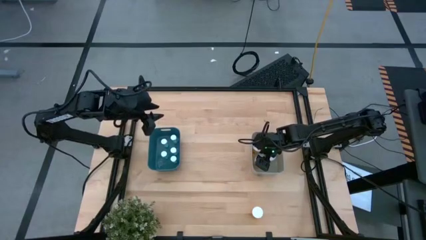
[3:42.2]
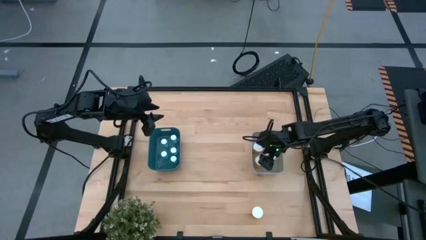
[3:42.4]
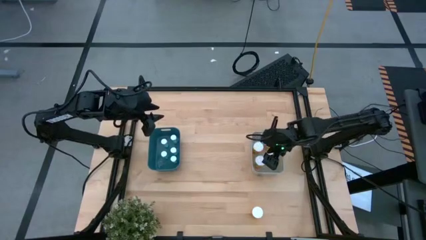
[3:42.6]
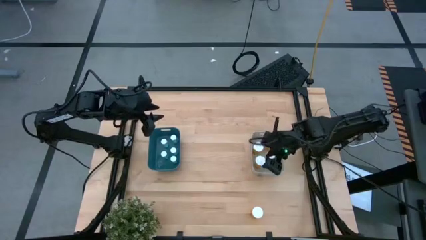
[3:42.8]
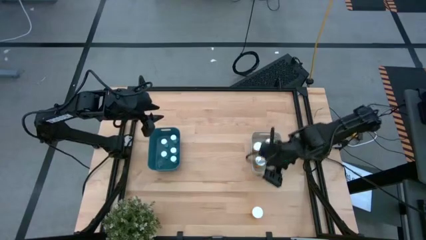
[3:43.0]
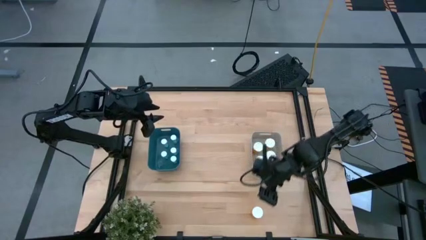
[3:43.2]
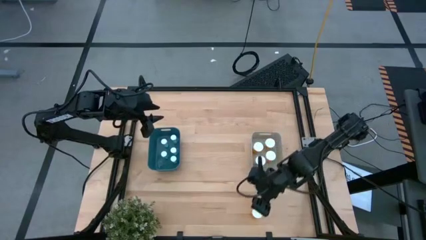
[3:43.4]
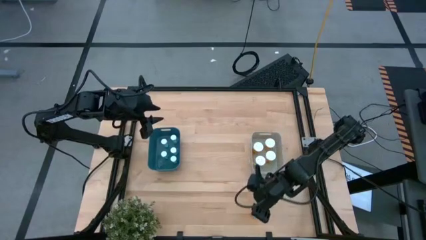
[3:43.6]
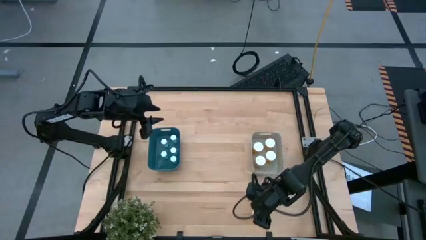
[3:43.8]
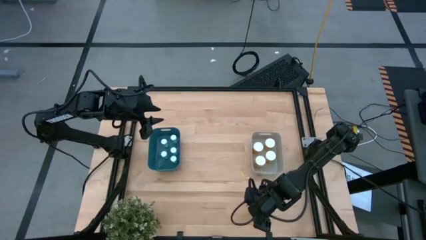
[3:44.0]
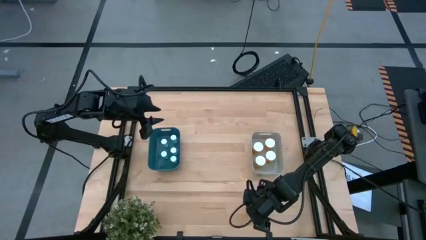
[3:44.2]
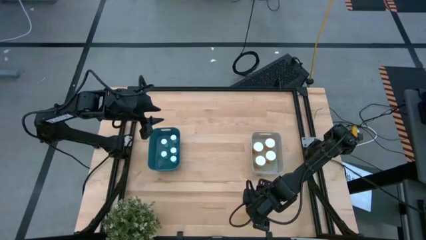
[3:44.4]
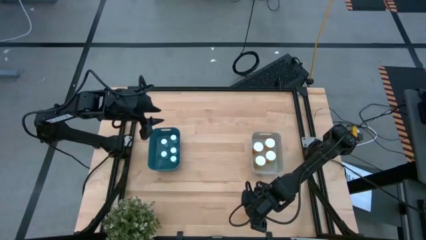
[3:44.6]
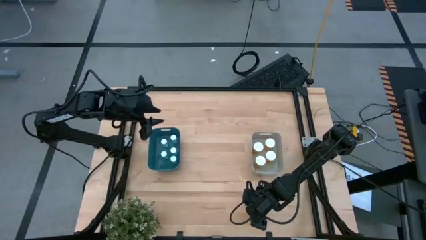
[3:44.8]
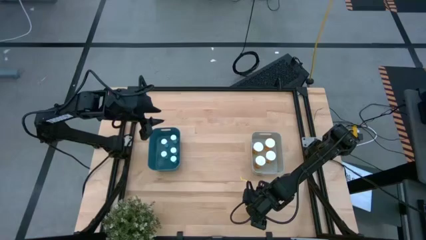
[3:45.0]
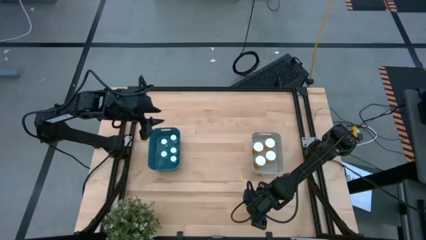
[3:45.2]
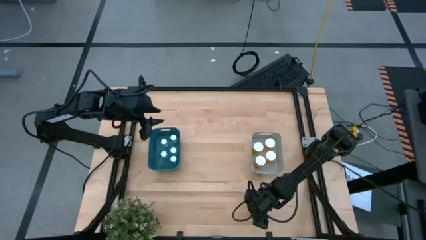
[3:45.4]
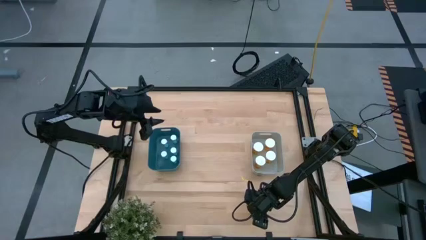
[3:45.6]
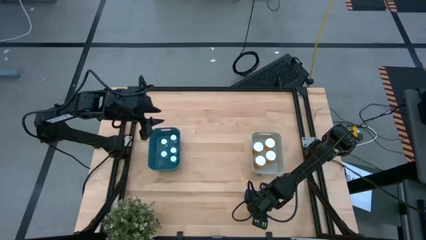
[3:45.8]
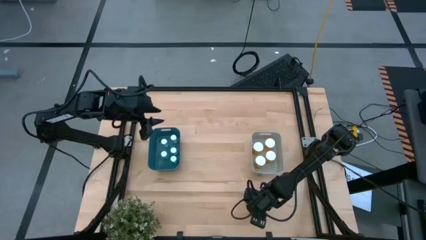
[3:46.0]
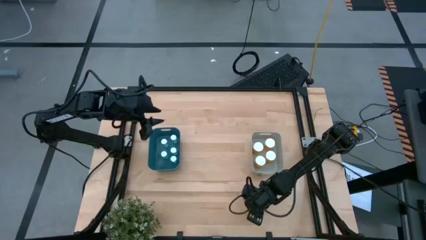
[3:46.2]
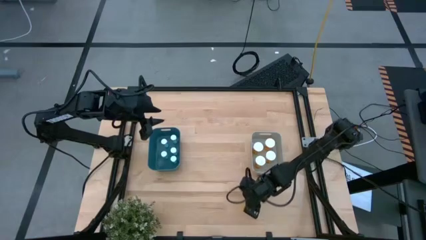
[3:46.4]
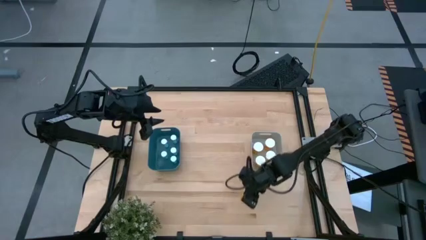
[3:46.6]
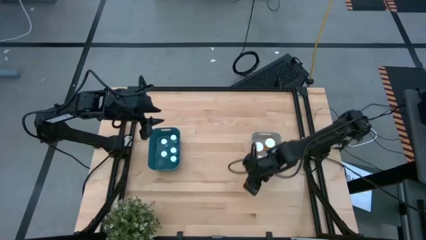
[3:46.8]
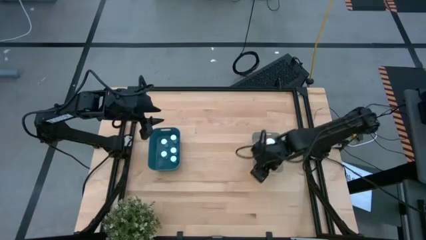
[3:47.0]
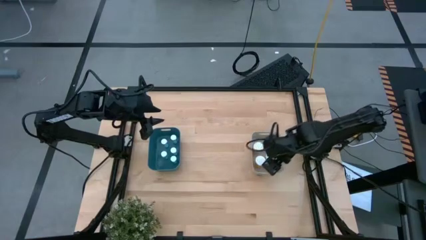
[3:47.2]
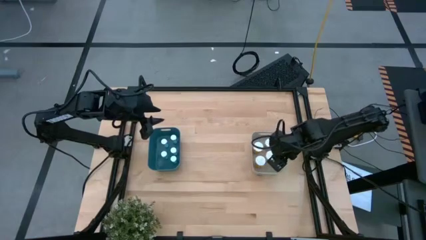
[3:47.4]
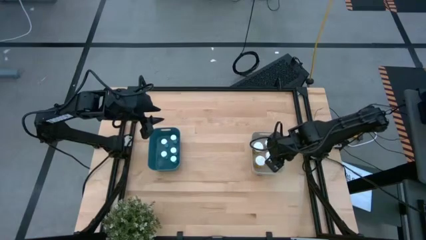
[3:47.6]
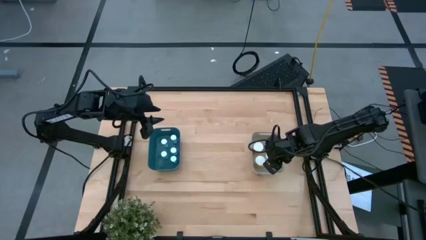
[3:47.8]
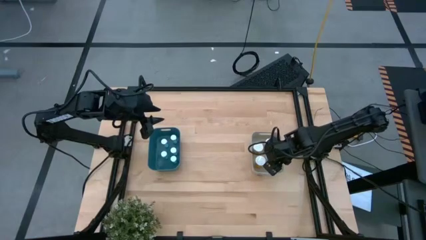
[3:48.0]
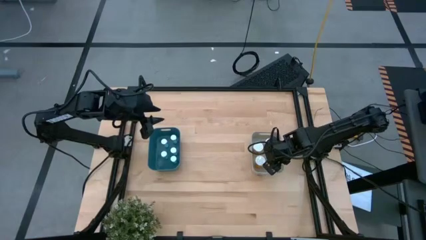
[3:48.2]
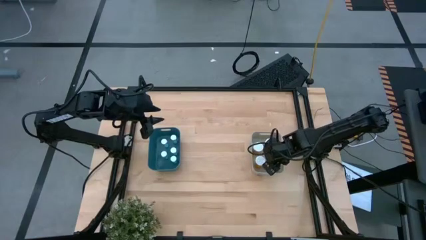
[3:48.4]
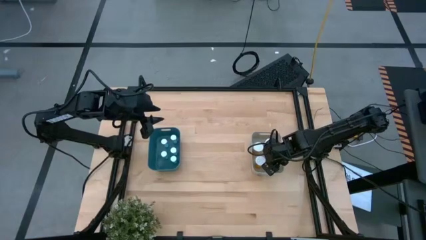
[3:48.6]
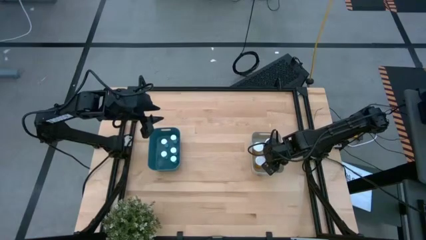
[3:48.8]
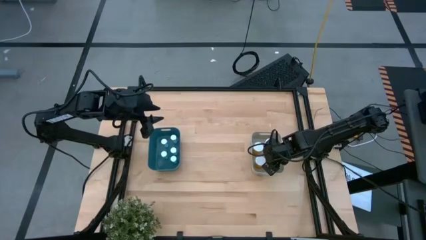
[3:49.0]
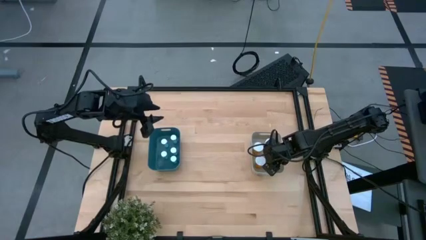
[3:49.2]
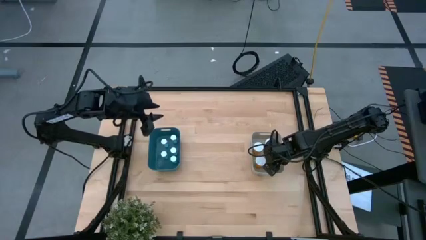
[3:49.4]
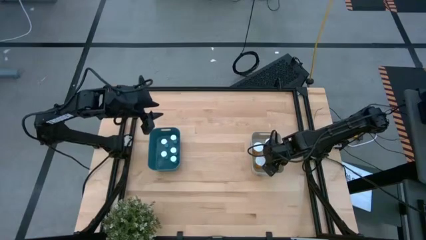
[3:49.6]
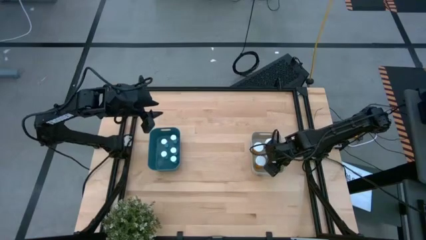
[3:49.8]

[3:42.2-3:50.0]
Task: Pick and place medicine bottles into bin by pill shape (circle, oval)
Put the orange pill bottle into the gray bin

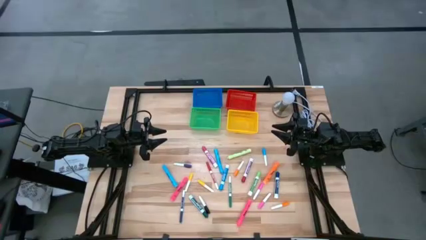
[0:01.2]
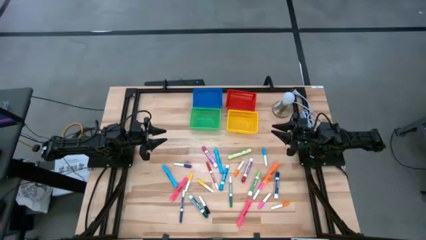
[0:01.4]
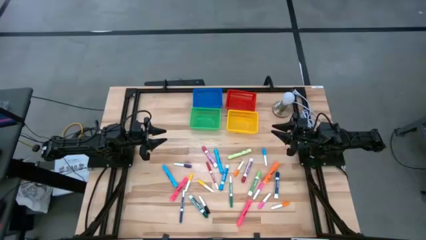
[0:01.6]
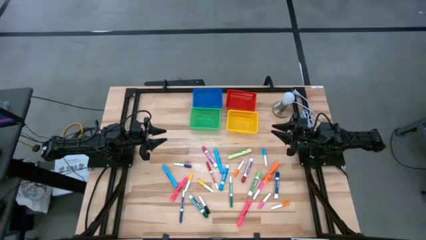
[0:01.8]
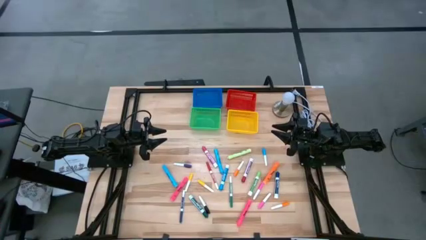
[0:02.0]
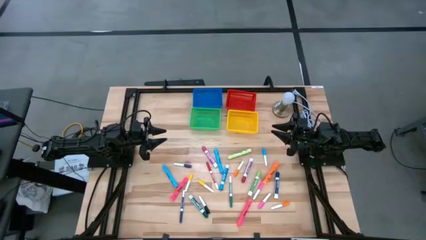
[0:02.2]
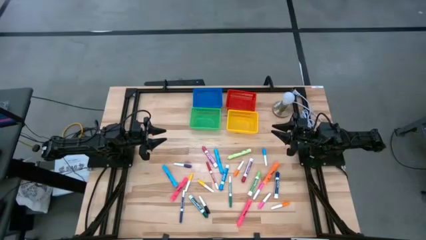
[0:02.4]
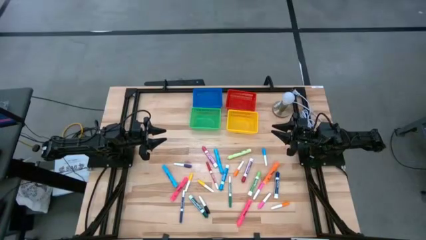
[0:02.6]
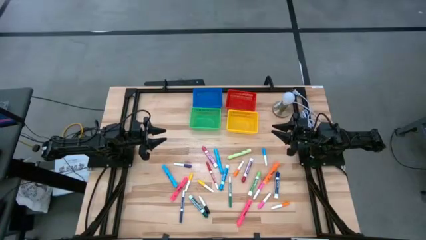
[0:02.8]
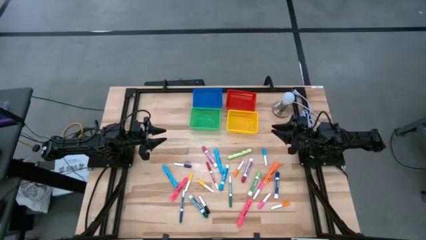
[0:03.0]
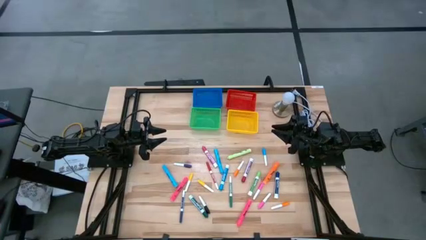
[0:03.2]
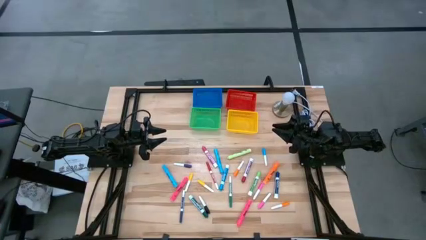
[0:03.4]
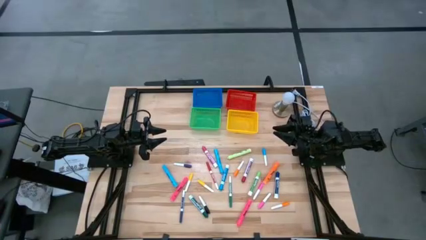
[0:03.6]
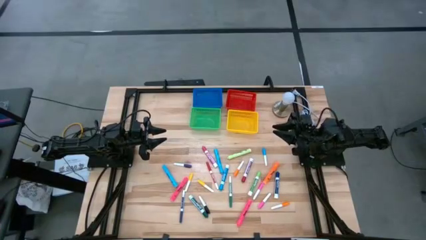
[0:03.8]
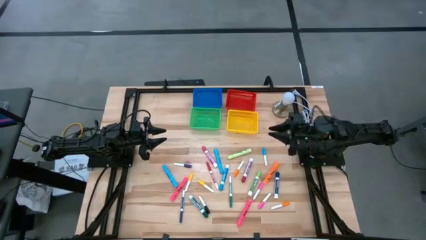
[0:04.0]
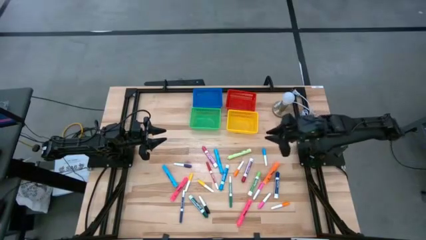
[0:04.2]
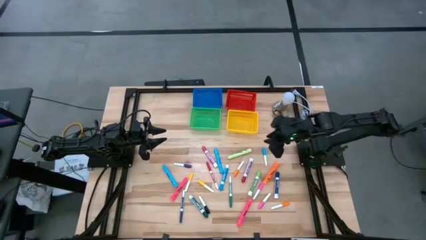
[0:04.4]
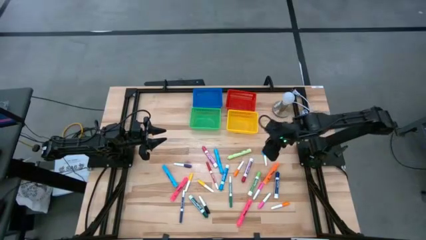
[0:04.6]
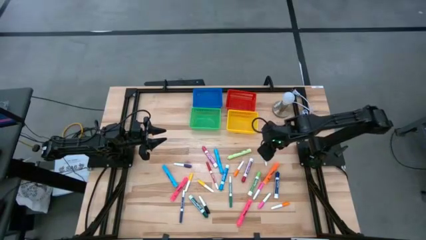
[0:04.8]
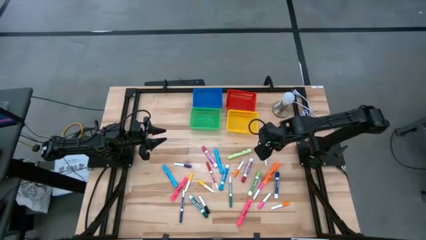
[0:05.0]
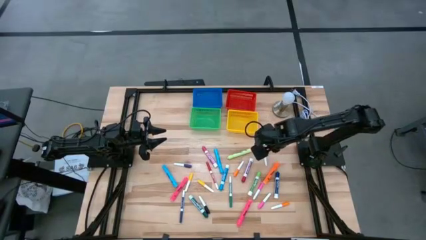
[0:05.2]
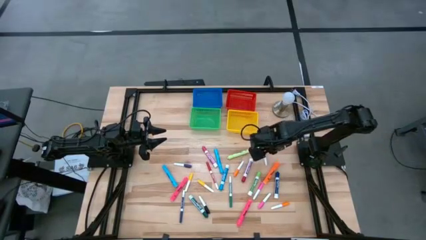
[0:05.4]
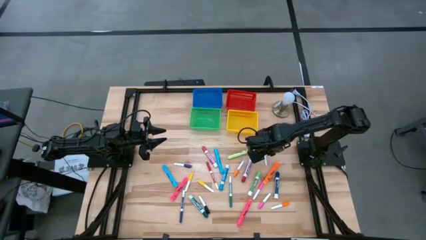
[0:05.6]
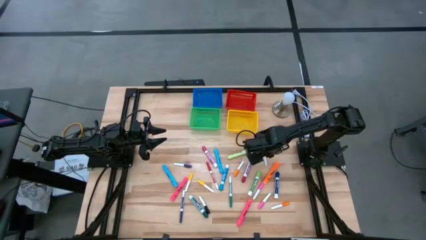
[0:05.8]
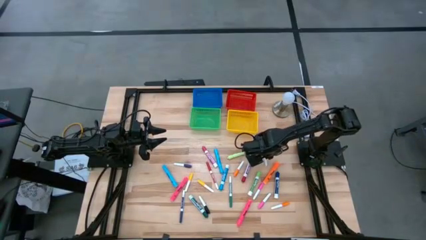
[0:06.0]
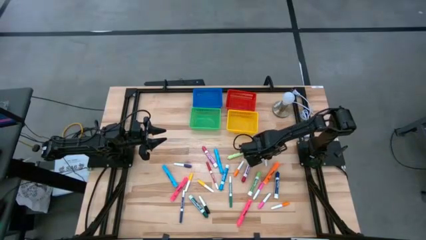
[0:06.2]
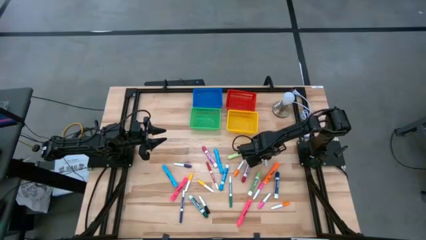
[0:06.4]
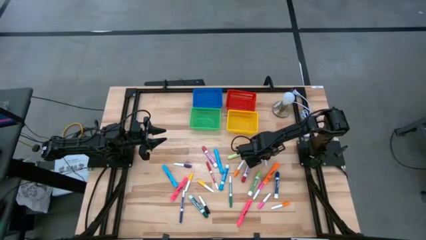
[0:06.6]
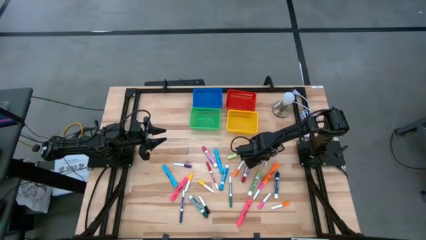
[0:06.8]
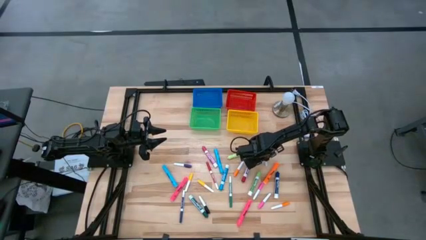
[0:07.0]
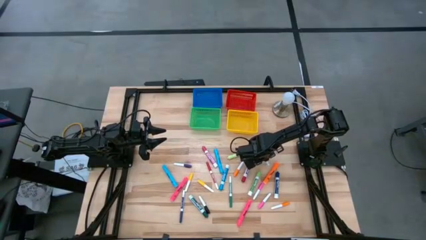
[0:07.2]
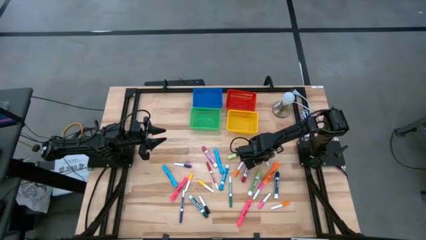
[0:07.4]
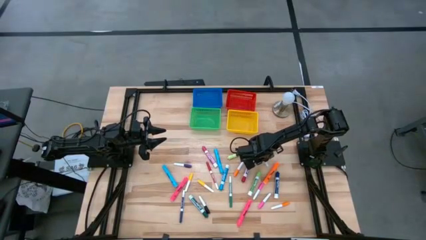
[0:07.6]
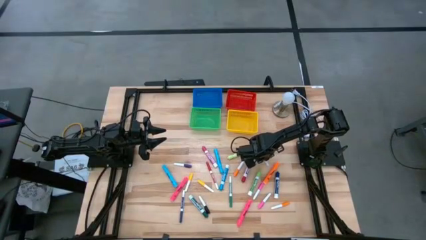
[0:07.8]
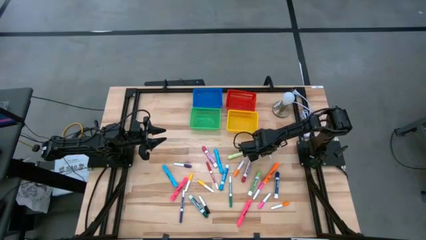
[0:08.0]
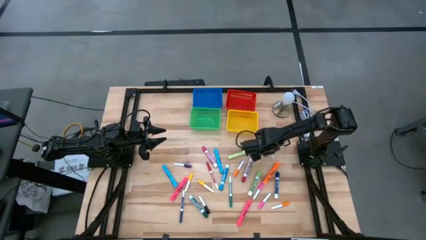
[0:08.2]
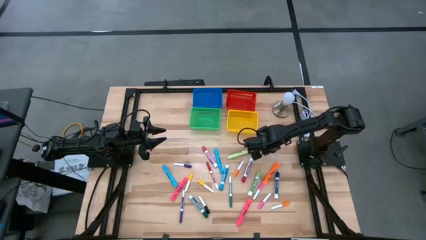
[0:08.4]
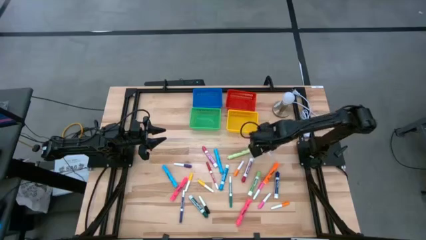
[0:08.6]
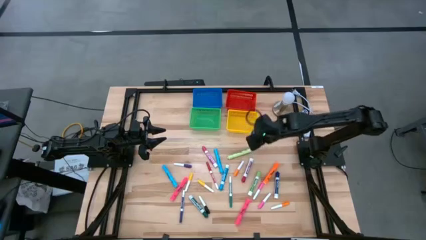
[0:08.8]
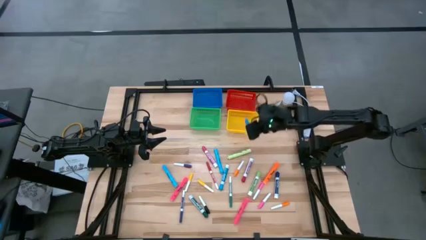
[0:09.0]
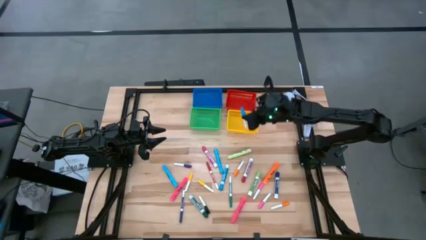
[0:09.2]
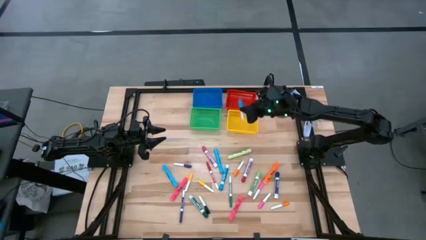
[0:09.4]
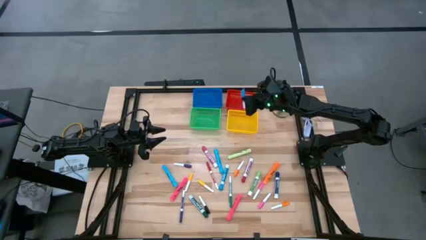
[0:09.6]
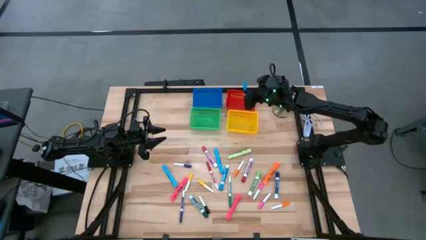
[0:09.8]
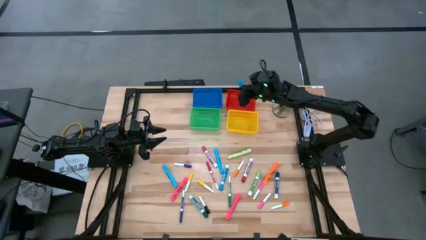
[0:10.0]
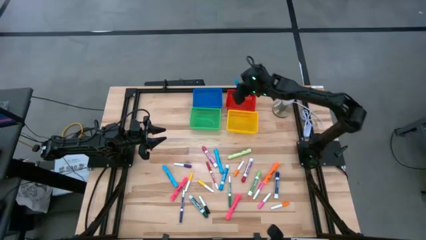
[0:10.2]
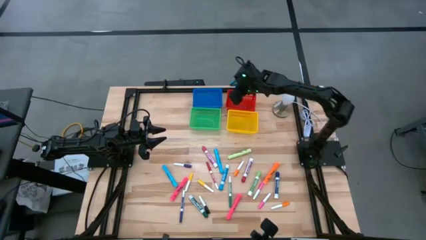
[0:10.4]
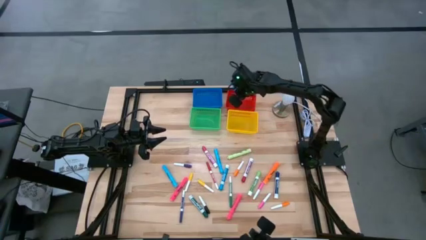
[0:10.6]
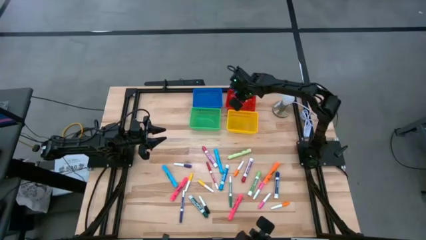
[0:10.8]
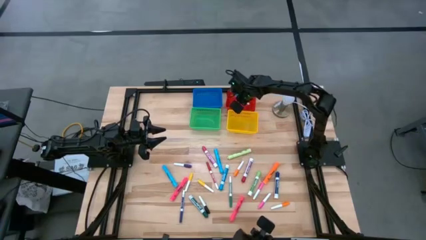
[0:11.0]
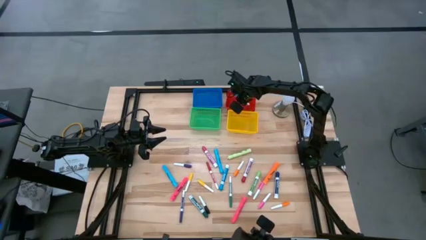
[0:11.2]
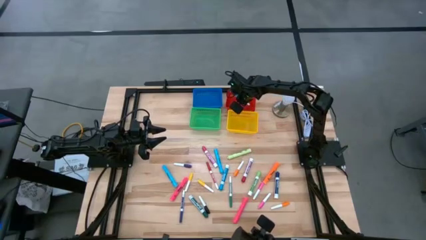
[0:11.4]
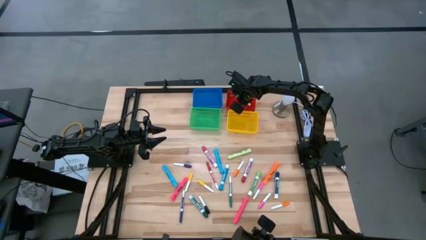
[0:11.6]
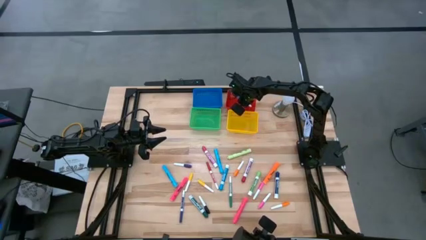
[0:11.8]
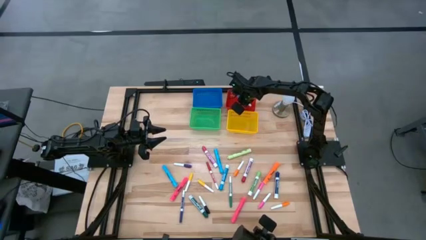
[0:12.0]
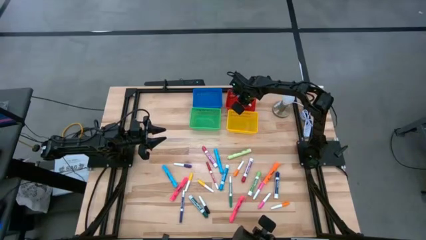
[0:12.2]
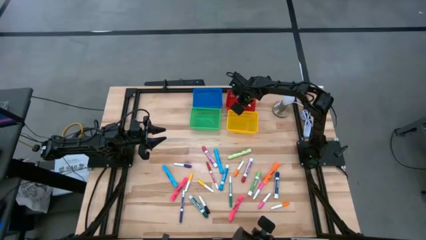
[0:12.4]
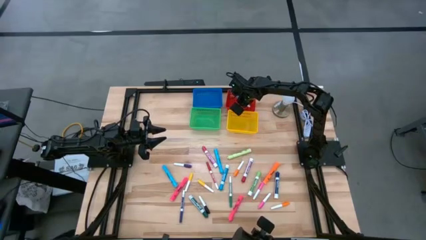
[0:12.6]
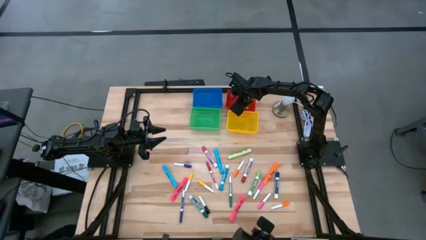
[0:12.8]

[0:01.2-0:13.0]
Task: Pick & Place Markers
Put the blue pen into the red basket
